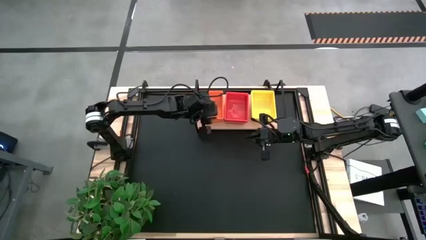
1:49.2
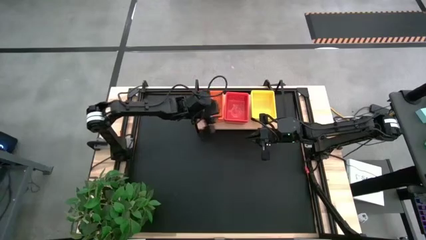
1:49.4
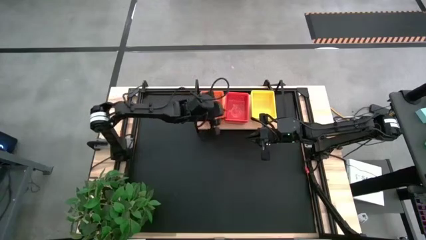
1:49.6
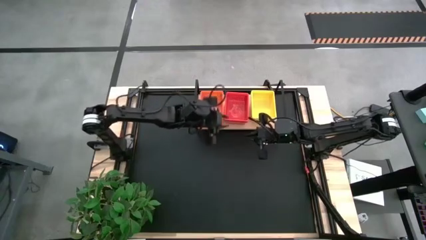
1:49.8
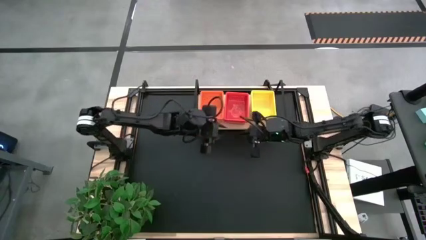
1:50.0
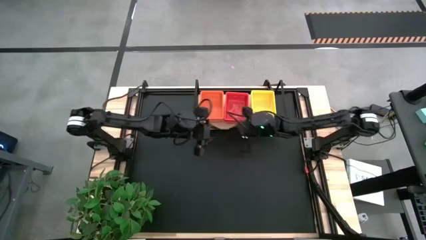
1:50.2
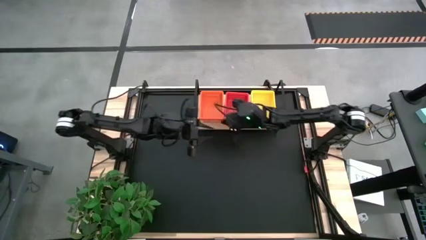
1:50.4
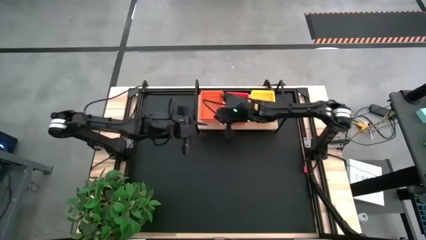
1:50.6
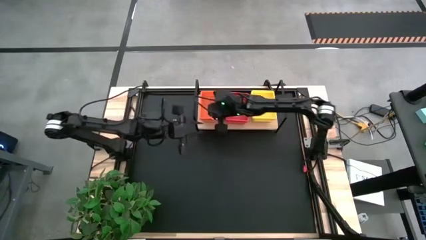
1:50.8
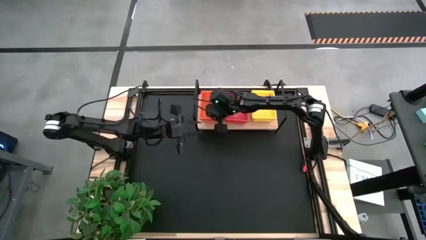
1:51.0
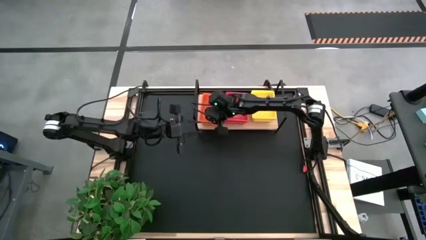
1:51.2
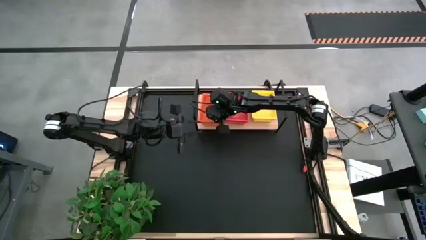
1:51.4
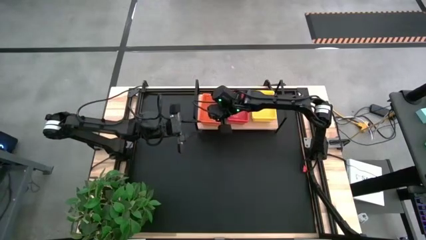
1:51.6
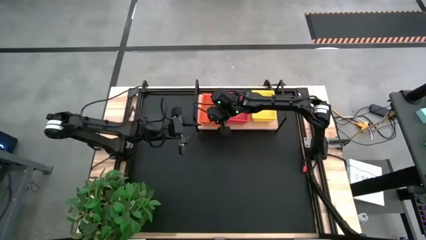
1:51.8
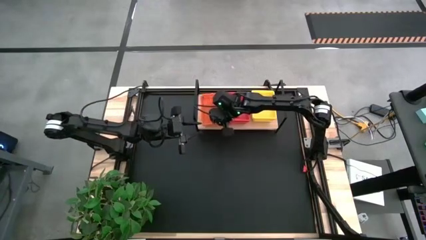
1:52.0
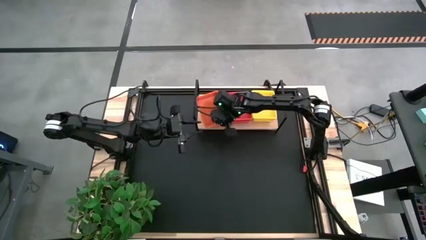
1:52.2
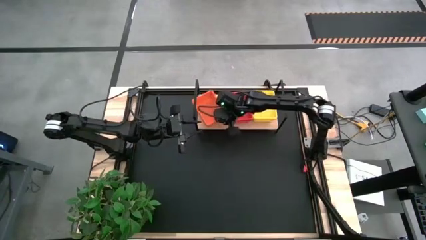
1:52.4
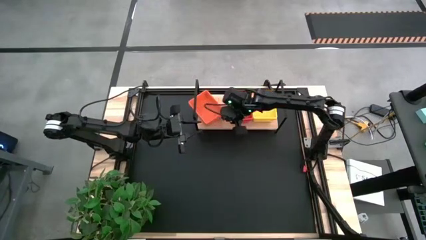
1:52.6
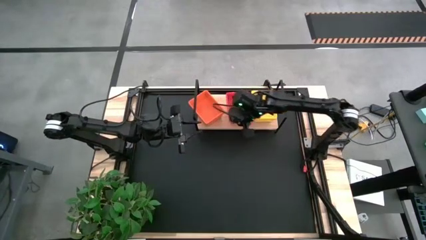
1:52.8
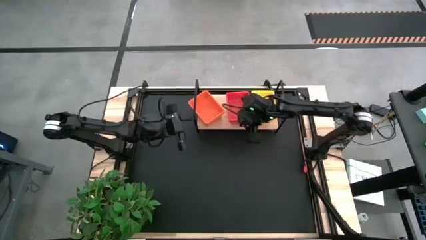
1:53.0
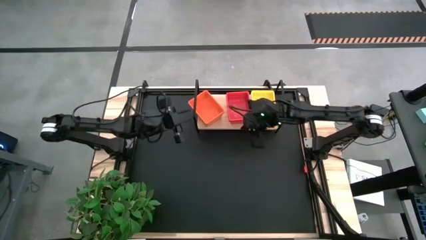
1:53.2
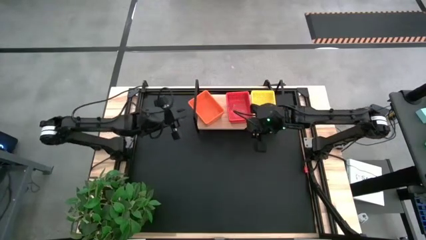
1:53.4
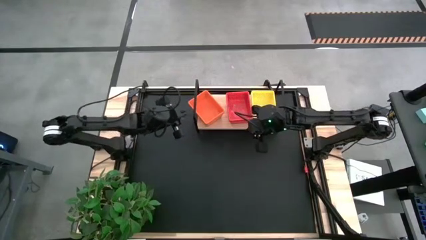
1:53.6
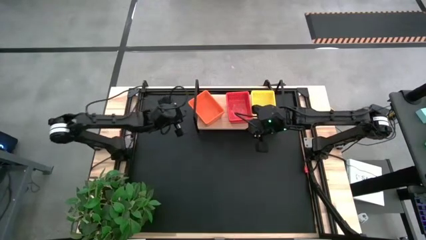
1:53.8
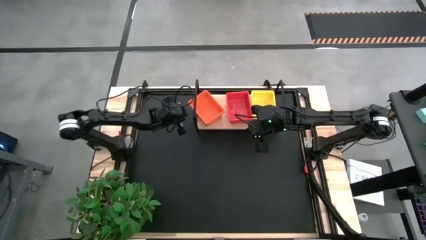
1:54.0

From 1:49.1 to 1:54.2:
Task: Stack baskets on shelf by color
Adjust the baskets on the shelf

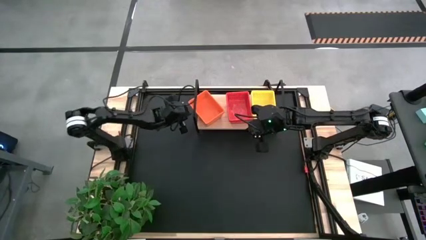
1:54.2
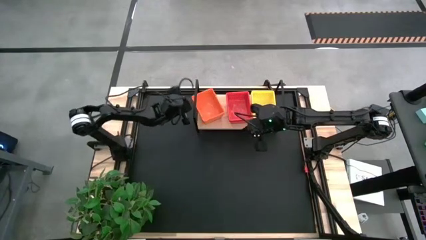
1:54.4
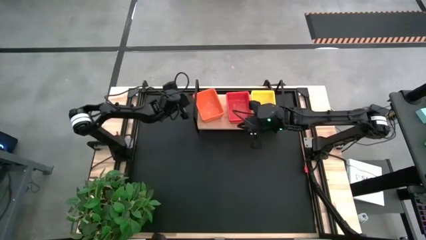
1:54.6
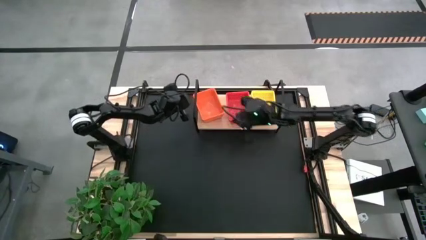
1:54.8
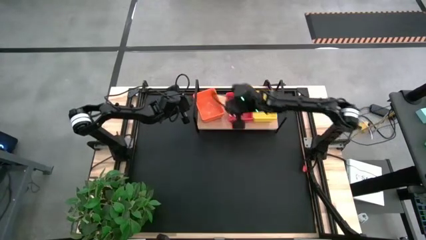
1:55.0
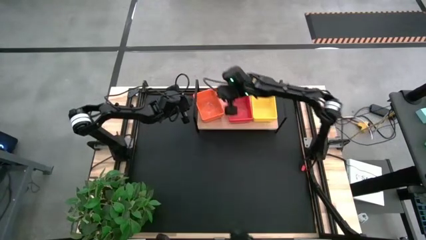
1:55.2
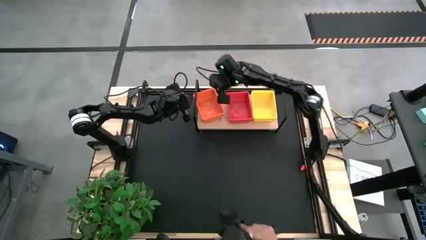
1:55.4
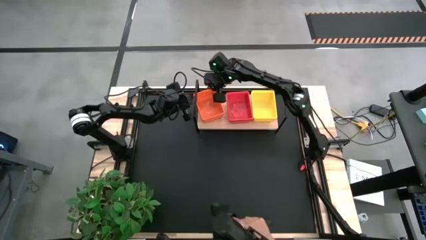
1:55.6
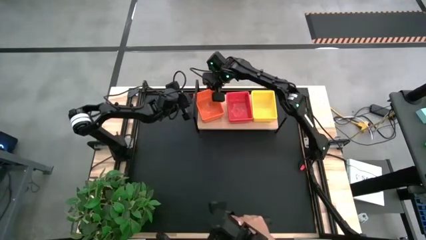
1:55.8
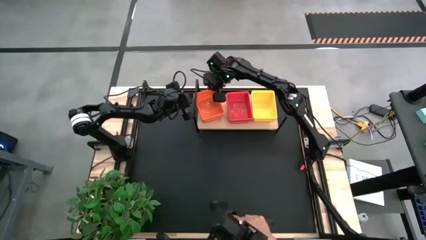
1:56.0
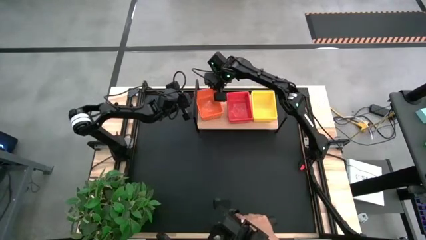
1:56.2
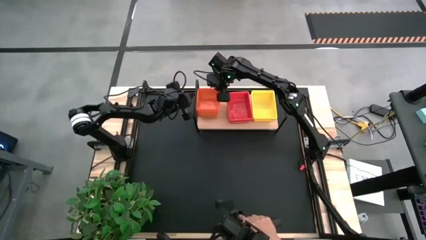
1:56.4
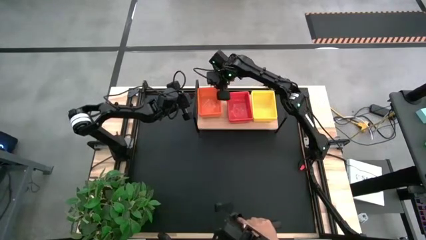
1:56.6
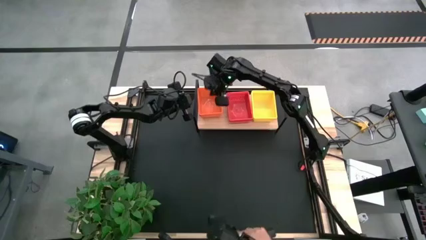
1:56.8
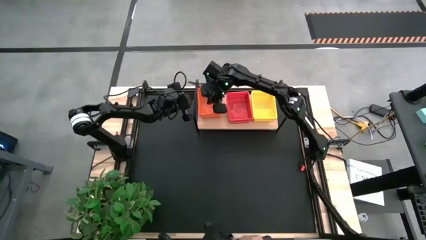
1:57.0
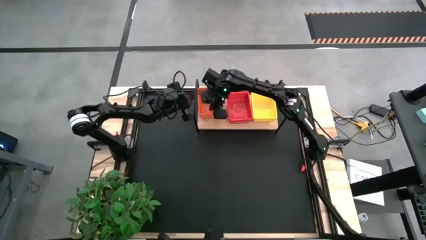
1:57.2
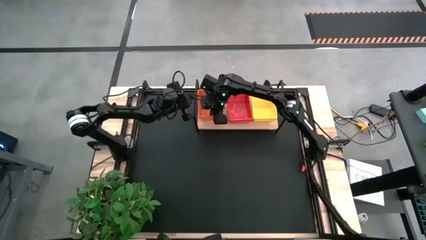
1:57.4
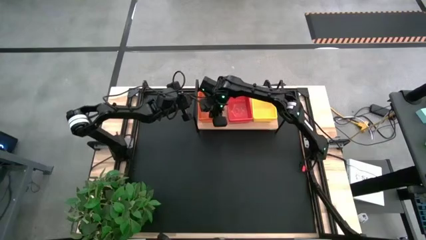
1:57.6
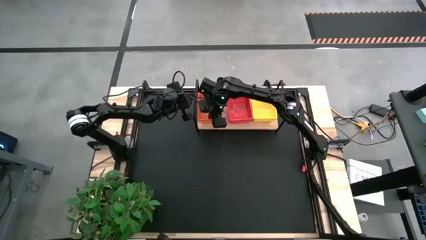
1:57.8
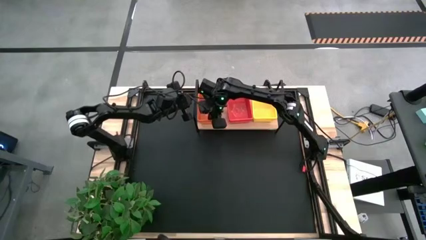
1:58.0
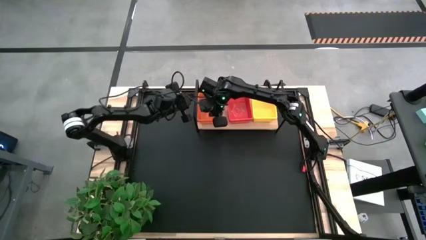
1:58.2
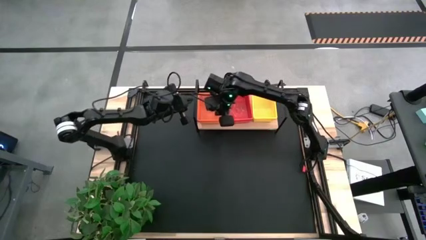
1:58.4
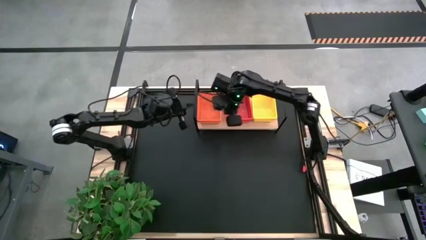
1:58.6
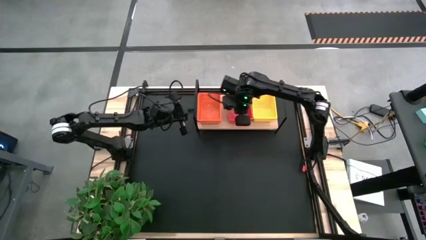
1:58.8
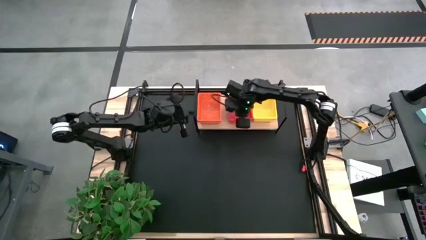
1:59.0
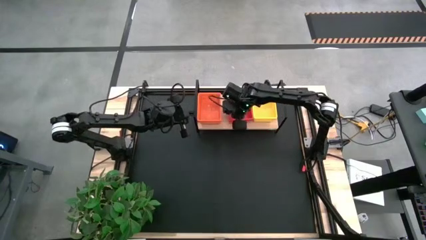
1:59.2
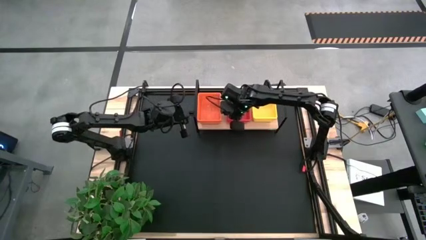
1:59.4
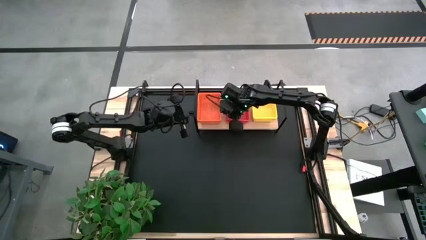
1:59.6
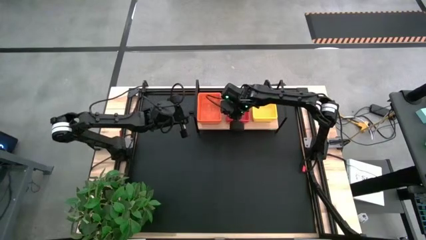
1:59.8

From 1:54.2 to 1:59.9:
Adjust the baskets on the shelf

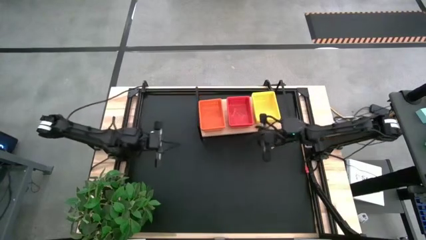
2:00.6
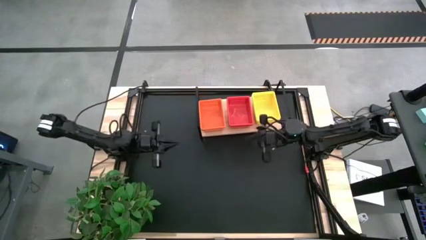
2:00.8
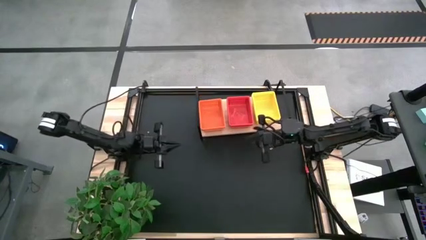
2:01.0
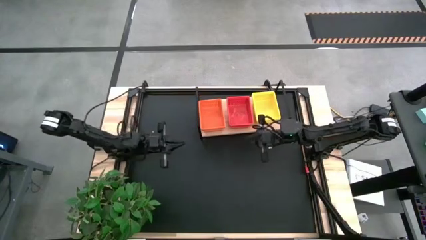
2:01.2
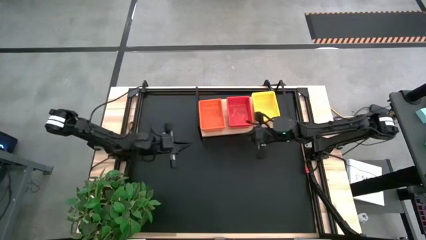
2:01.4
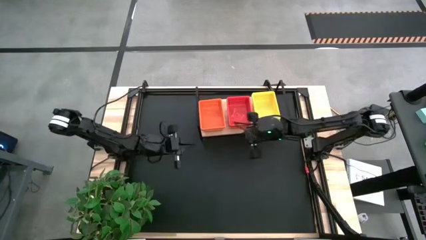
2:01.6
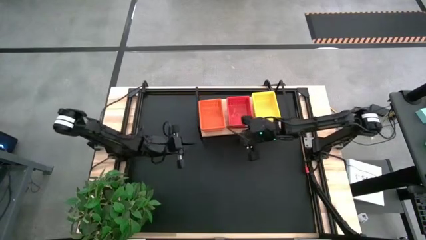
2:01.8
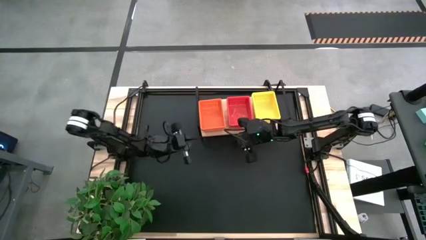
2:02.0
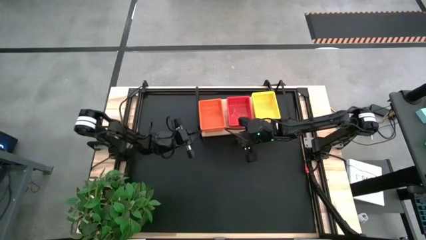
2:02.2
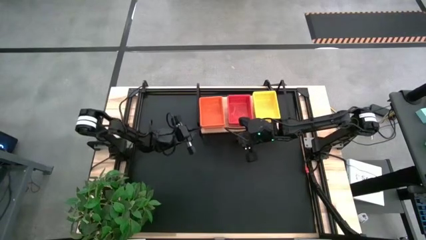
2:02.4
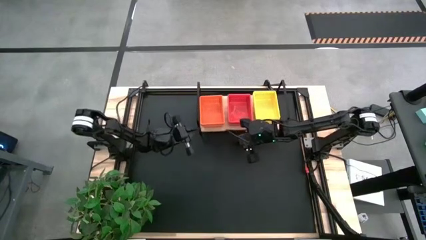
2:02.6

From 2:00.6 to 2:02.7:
Adjust the shelf

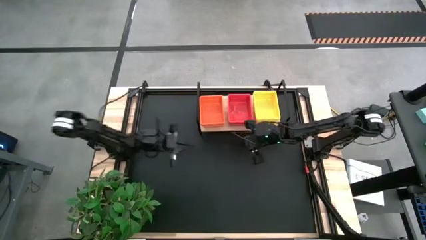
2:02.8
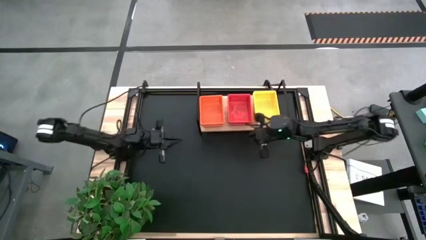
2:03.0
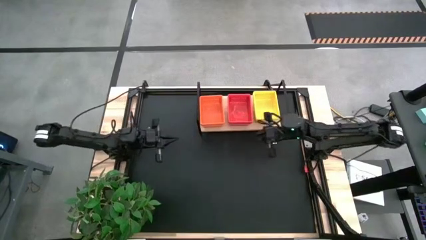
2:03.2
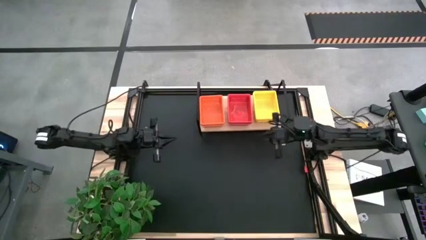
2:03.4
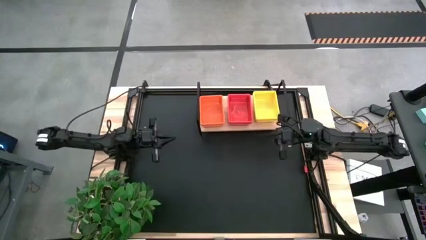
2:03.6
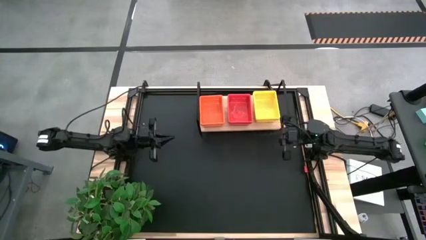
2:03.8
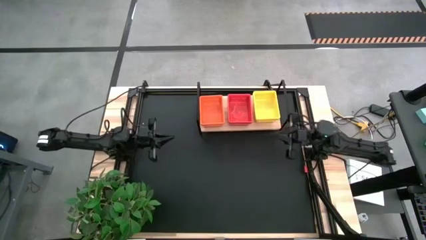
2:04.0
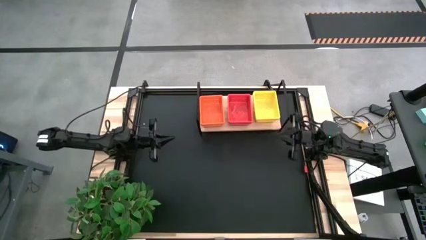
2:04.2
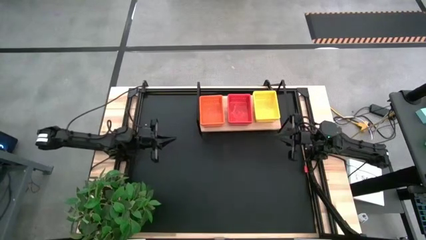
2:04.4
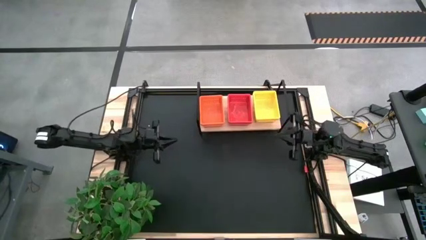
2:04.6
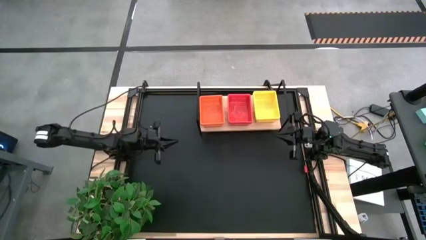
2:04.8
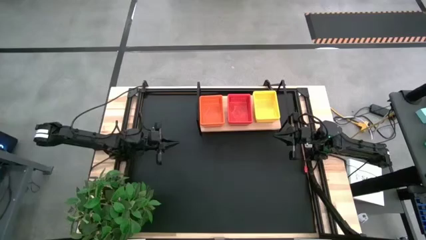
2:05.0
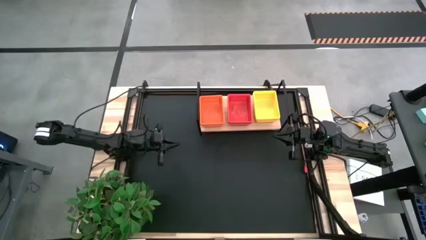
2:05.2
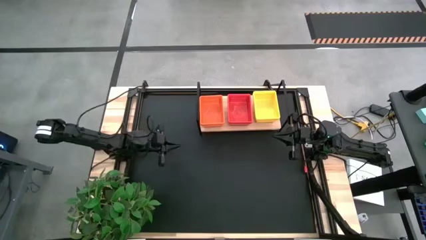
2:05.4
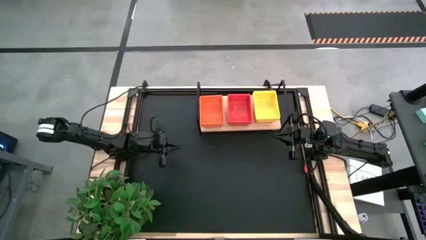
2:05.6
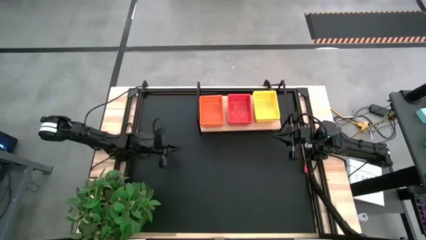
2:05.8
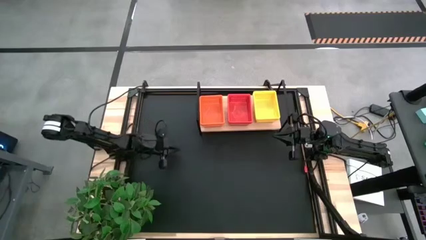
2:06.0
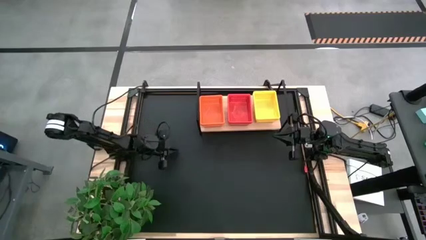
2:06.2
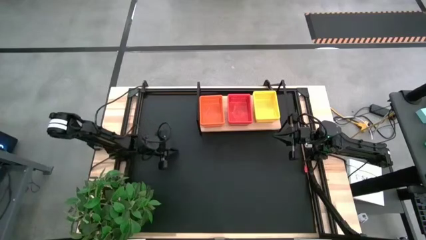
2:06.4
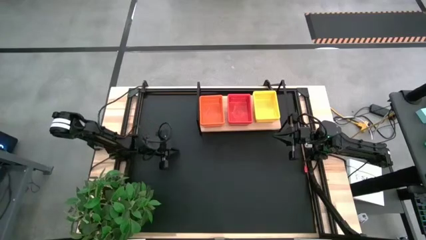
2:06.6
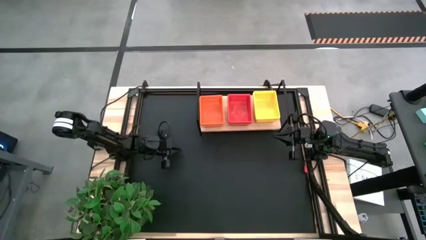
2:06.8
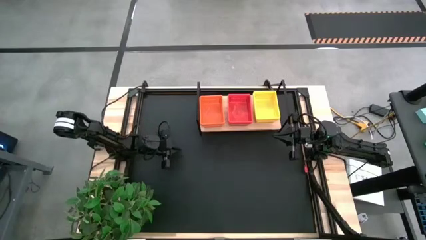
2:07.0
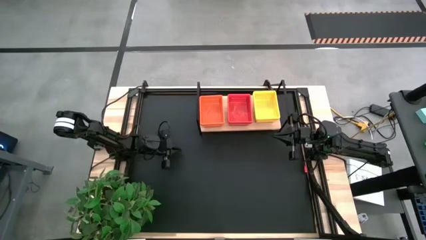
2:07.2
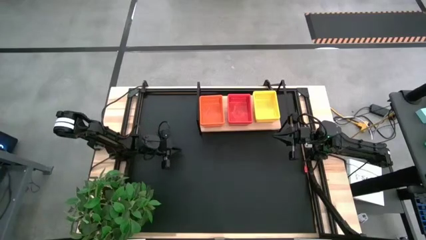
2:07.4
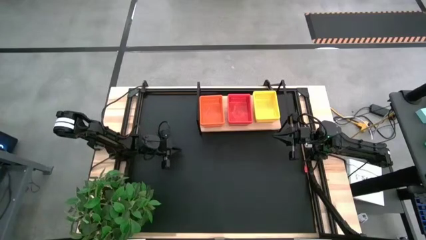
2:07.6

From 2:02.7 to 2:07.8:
Return to Home Position
